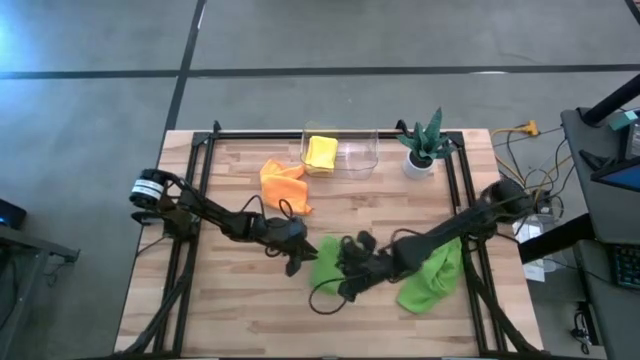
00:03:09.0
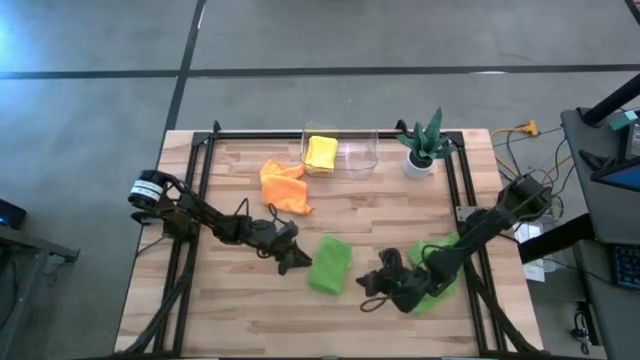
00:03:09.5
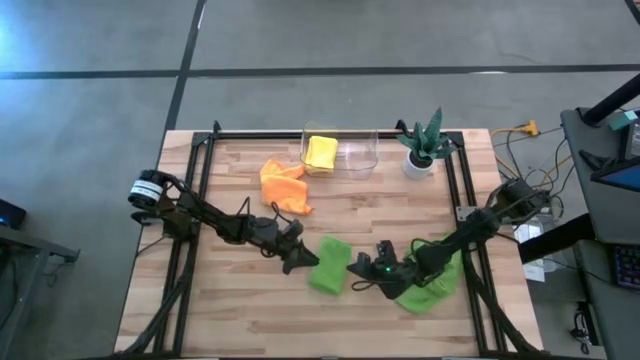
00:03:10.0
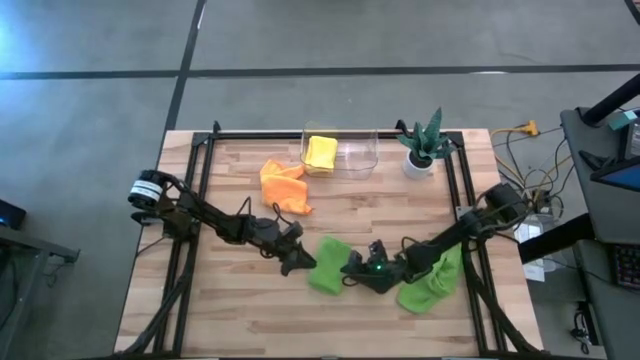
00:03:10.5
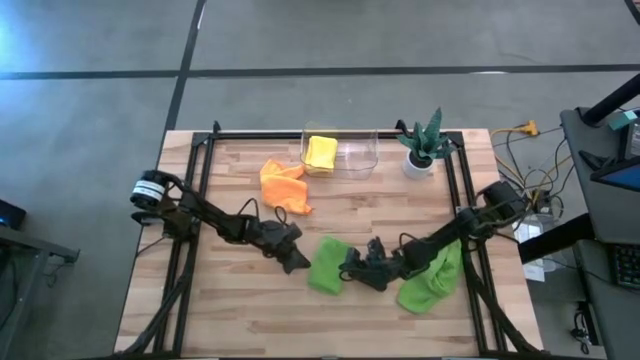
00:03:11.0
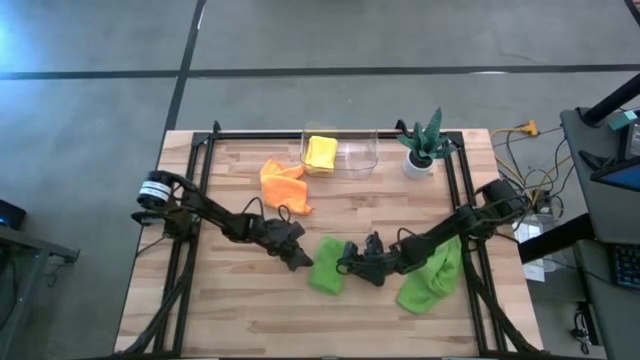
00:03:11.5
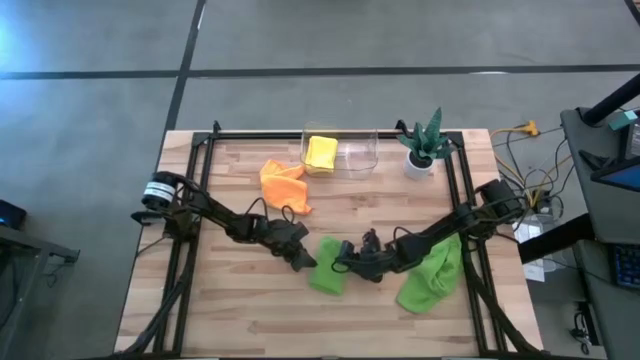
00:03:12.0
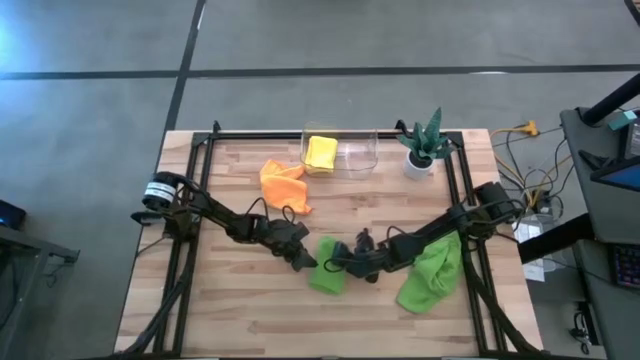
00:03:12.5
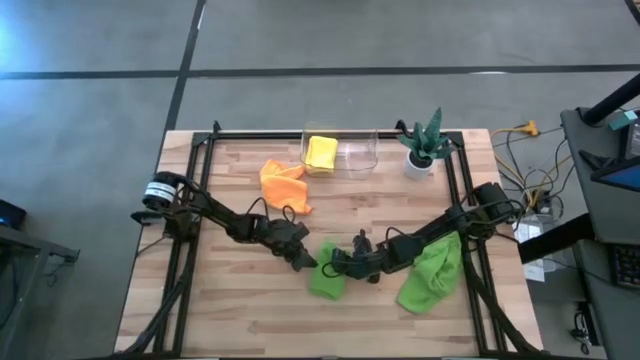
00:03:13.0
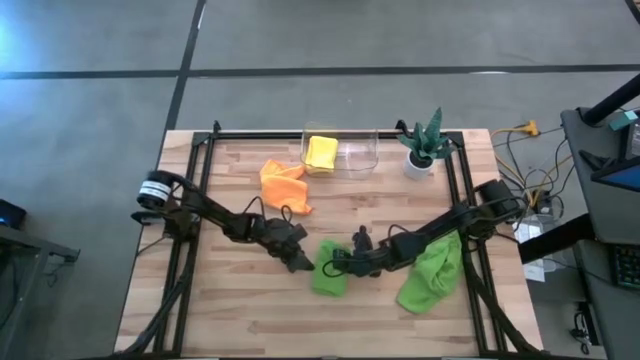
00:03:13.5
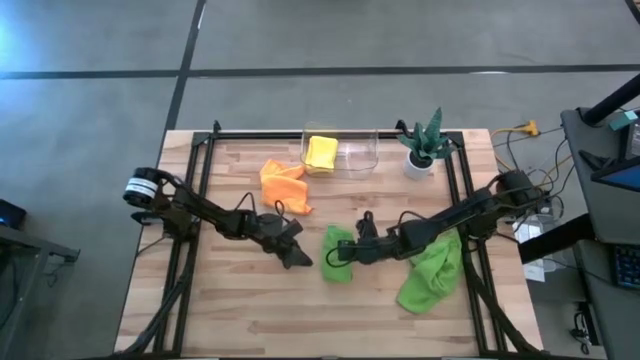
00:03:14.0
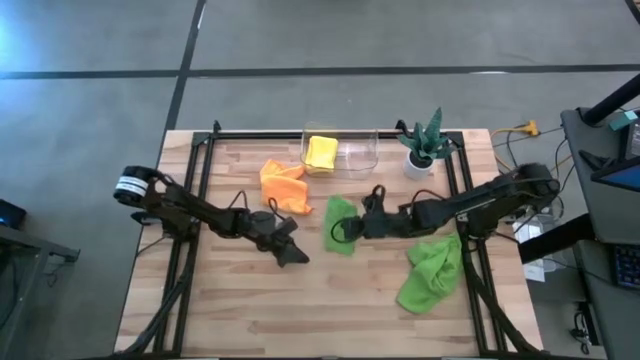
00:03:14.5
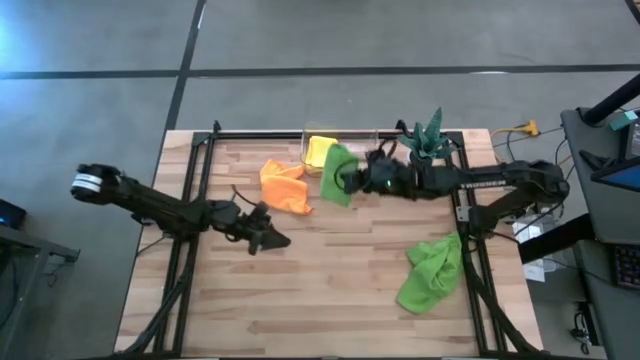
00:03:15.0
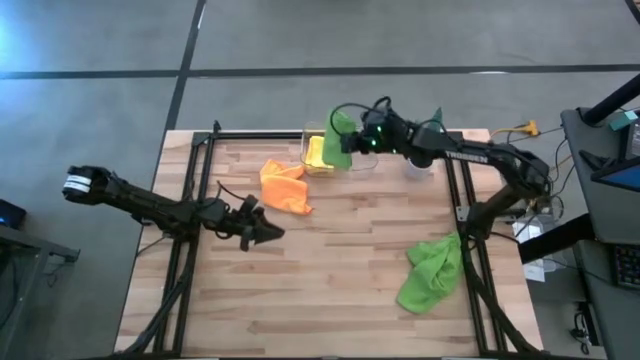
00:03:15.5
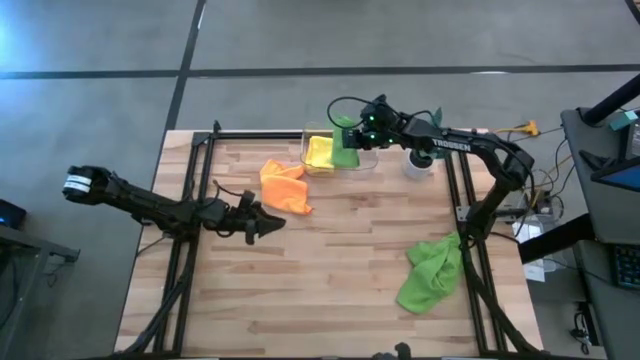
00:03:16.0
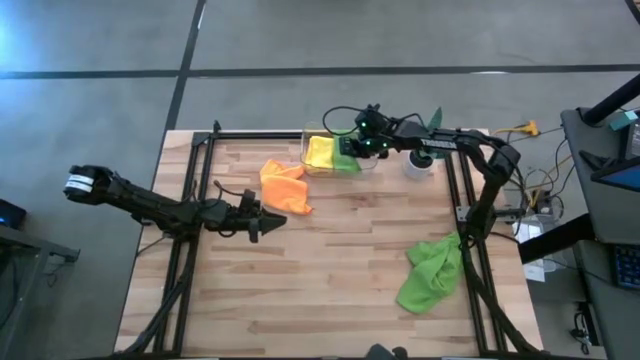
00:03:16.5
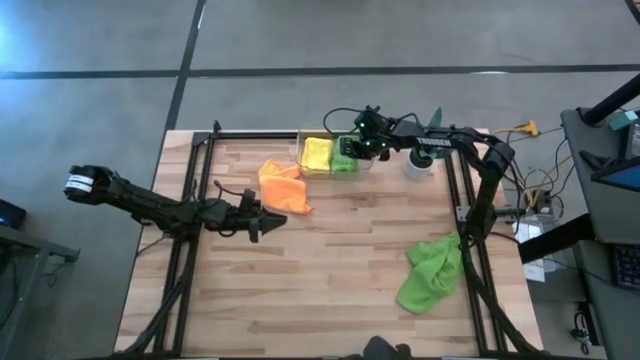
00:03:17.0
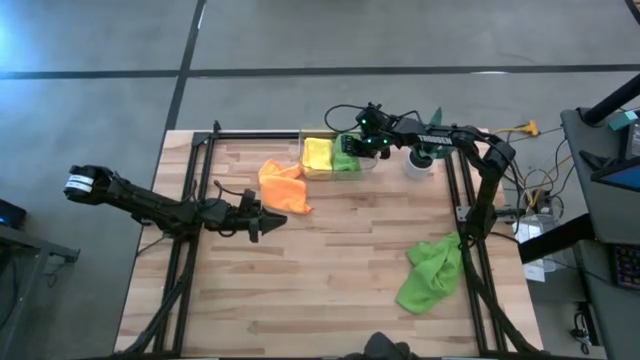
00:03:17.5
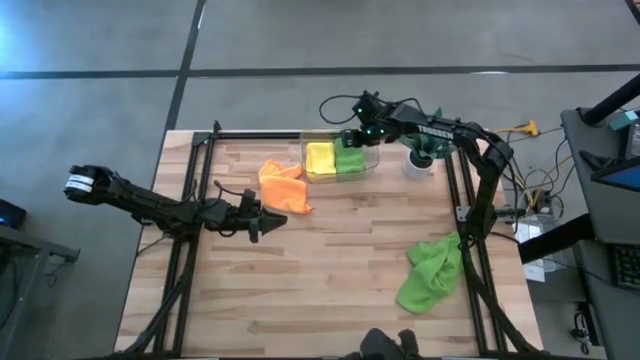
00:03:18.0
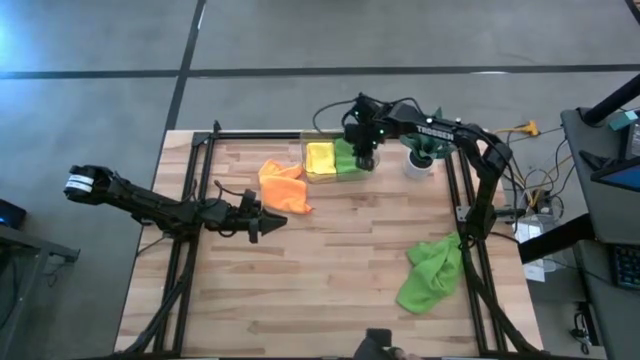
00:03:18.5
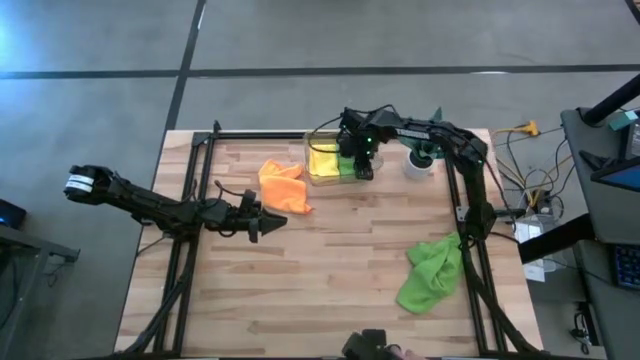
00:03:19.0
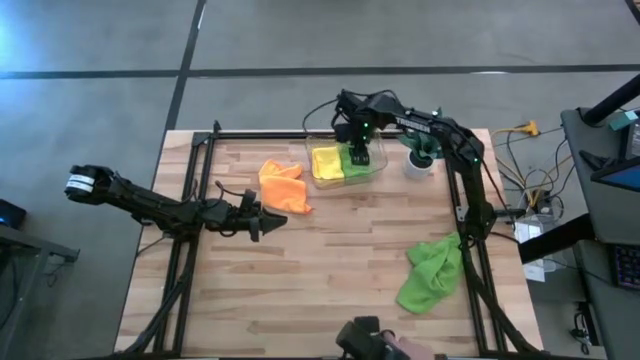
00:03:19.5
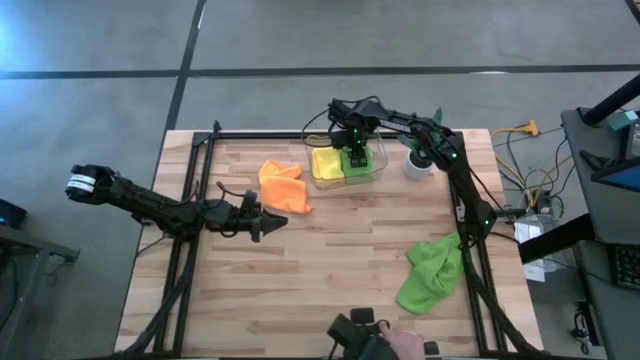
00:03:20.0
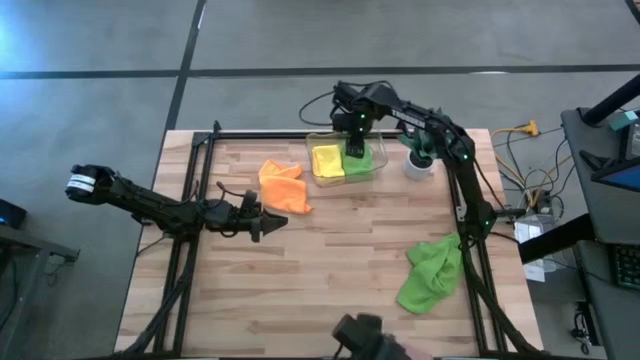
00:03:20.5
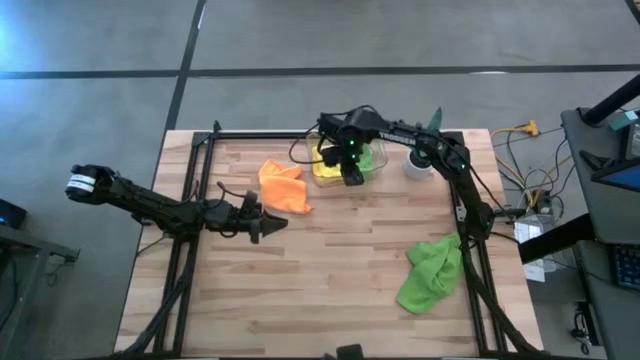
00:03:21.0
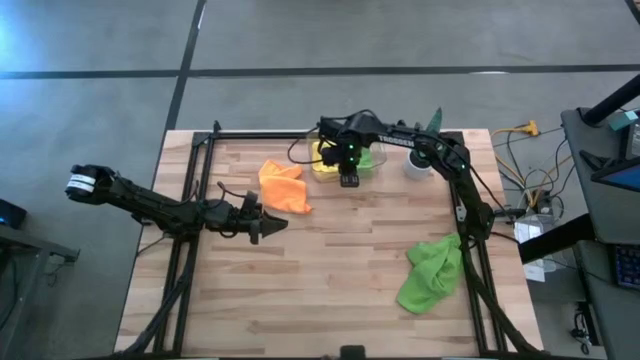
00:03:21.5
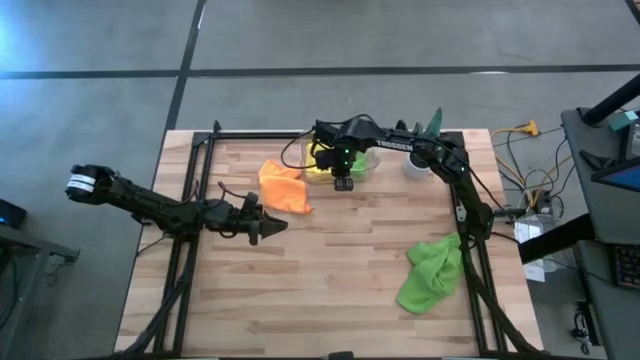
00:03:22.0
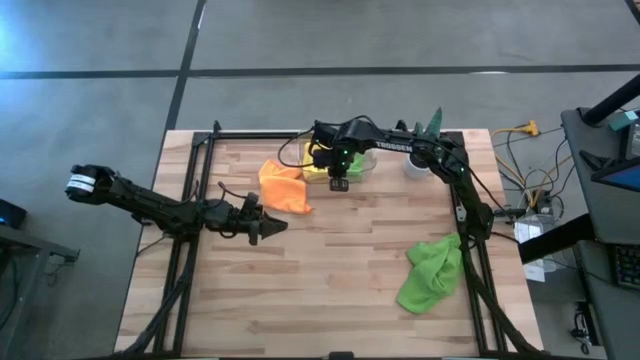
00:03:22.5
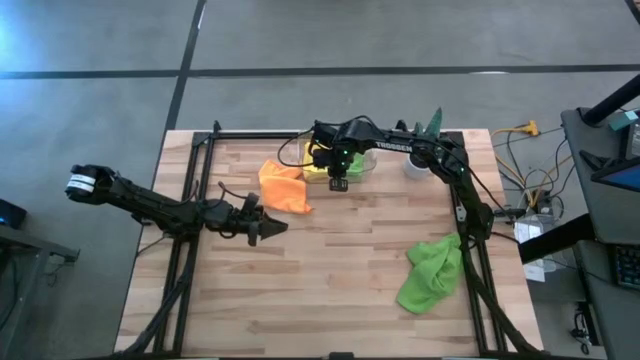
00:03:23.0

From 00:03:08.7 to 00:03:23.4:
Task: Fold microfiber towels
Put the left folded green microfiber towel into the transparent bin

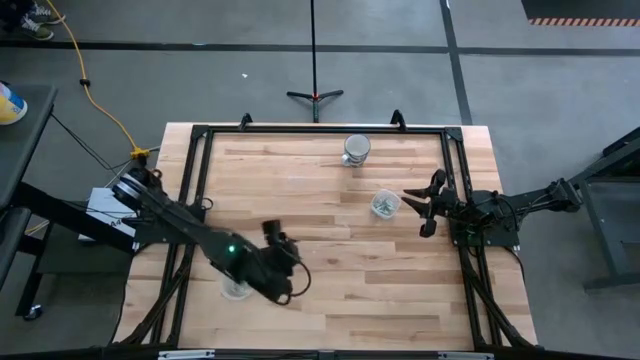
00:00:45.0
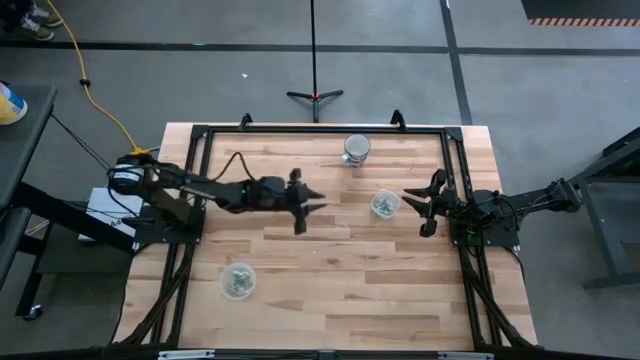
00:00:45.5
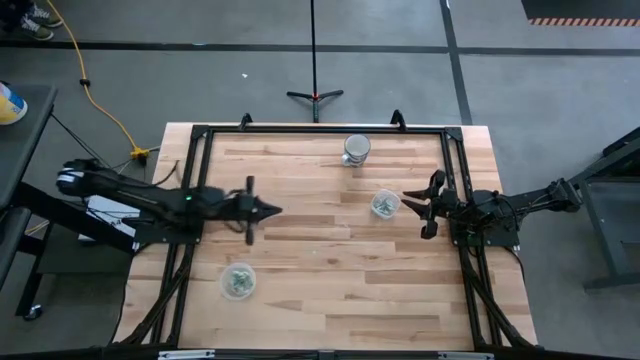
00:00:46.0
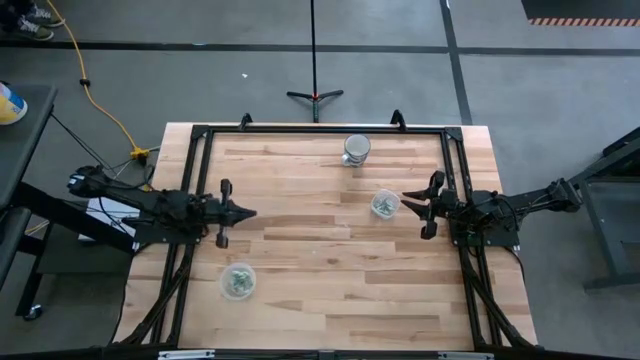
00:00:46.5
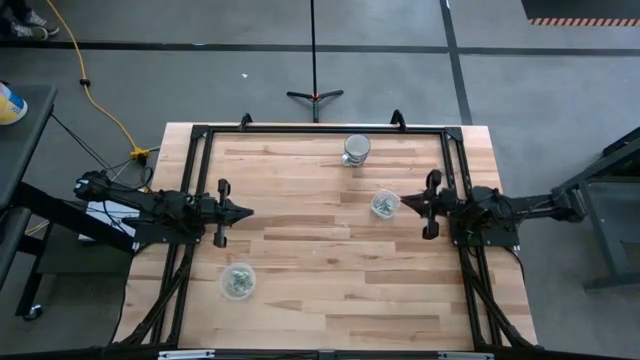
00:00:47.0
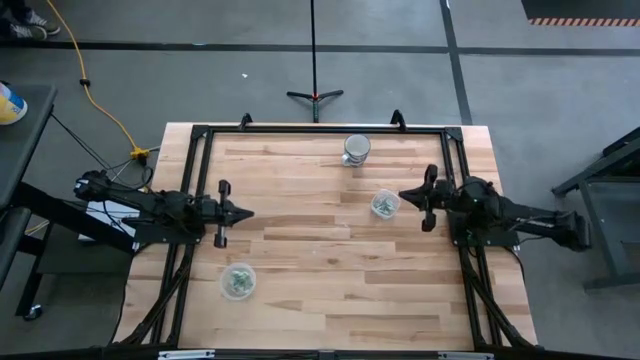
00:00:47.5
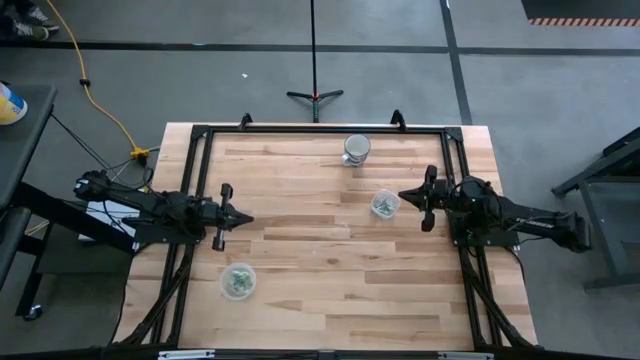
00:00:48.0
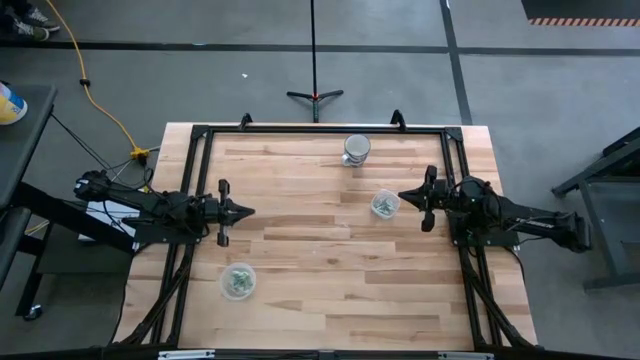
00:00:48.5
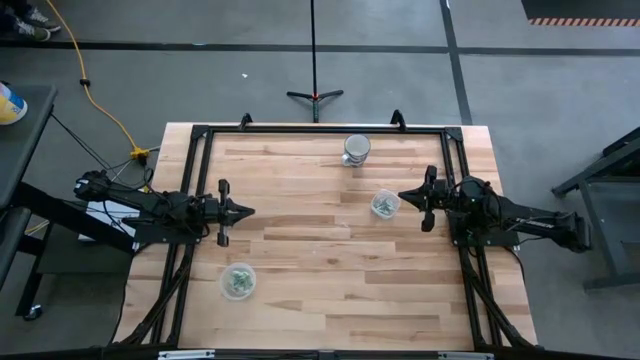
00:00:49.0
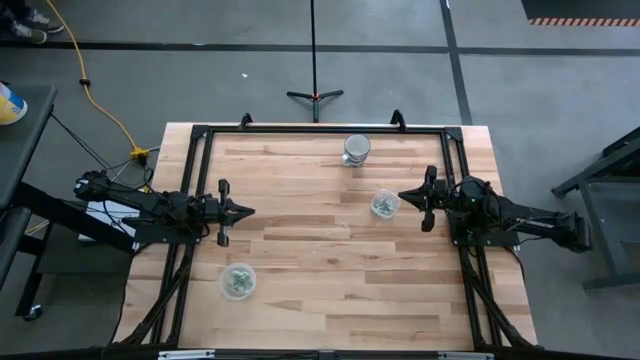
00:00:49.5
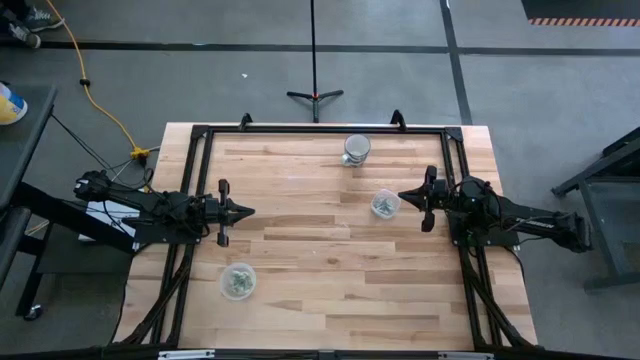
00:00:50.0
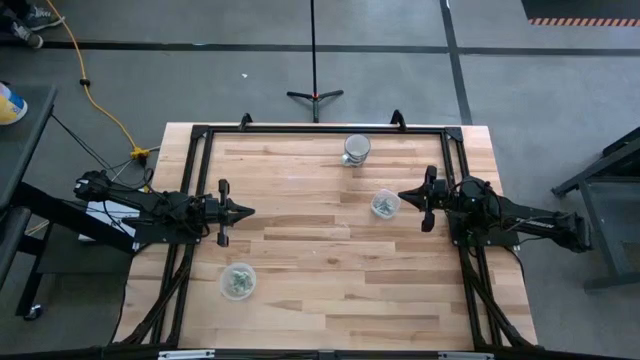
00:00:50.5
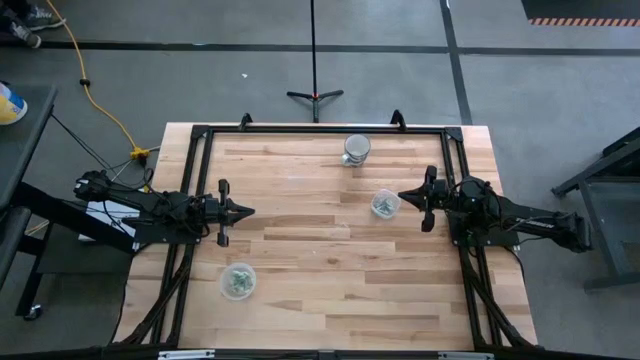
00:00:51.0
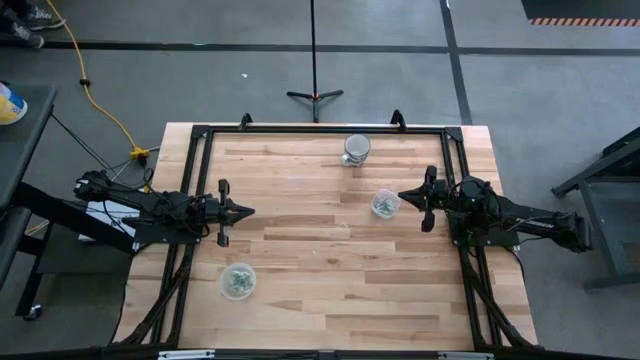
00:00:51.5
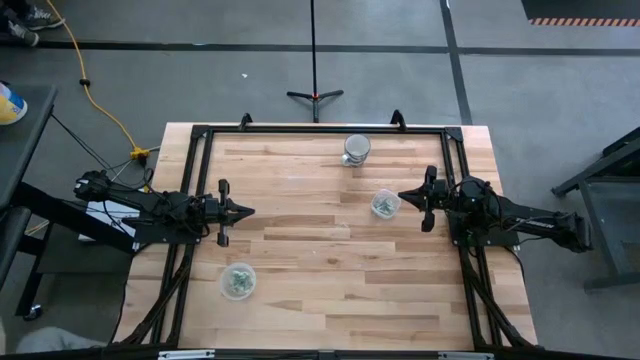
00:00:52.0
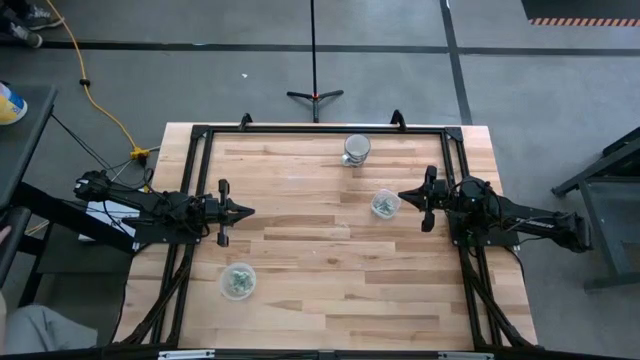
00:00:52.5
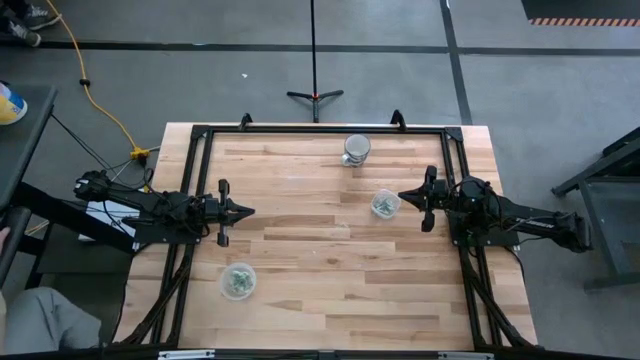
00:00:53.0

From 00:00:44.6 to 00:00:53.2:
Task: Pick and place Stevia / Truvia into bins
Return to Home Position
